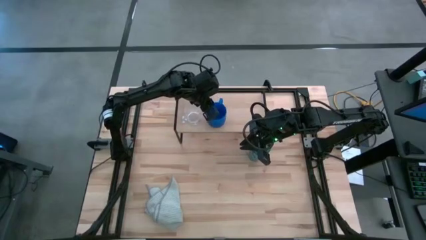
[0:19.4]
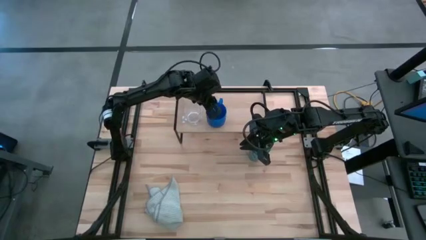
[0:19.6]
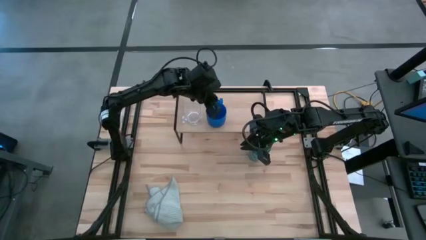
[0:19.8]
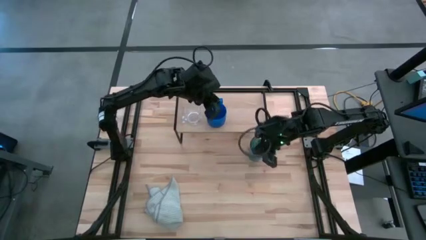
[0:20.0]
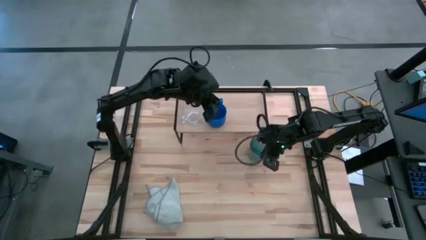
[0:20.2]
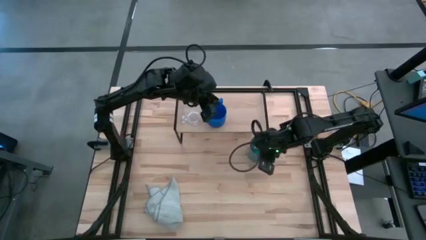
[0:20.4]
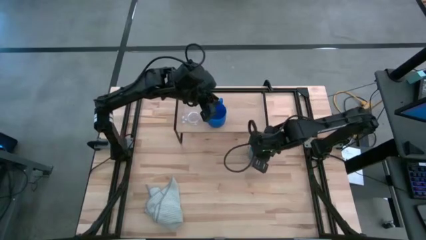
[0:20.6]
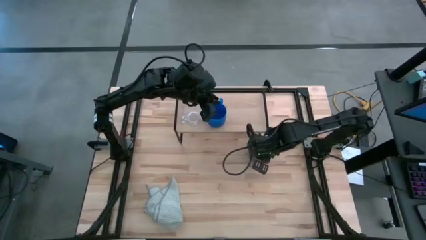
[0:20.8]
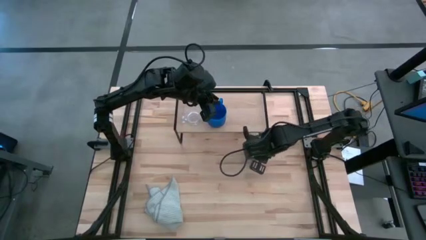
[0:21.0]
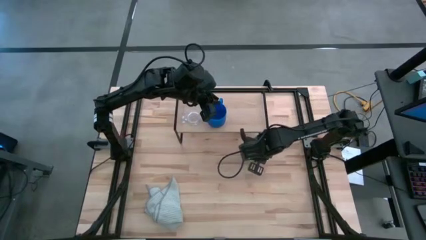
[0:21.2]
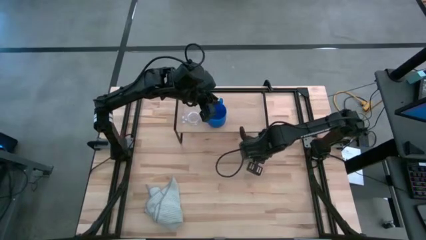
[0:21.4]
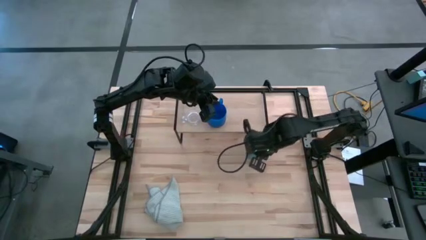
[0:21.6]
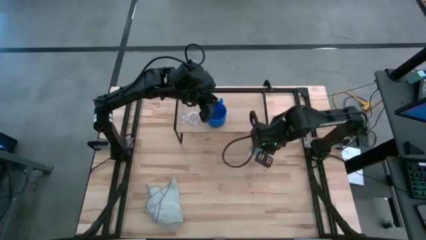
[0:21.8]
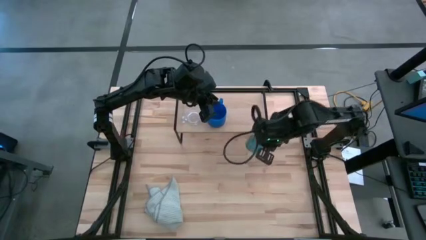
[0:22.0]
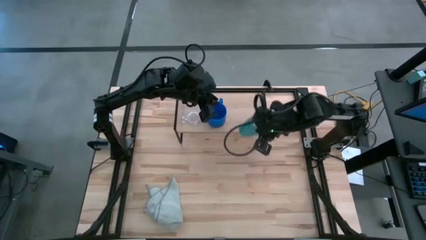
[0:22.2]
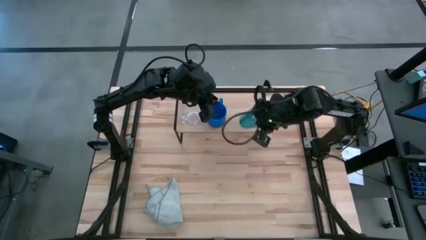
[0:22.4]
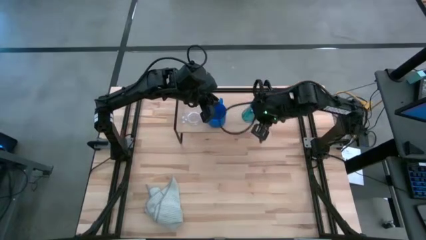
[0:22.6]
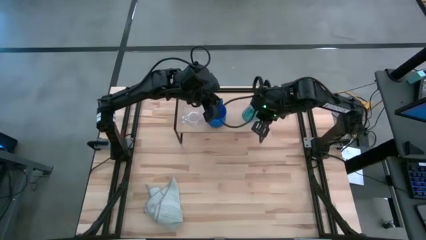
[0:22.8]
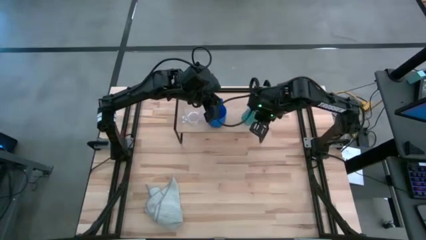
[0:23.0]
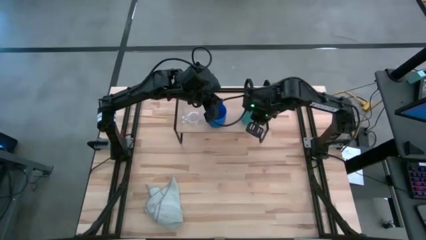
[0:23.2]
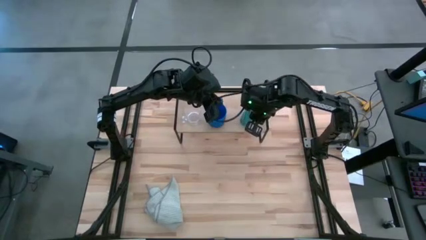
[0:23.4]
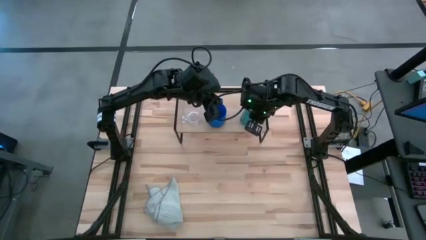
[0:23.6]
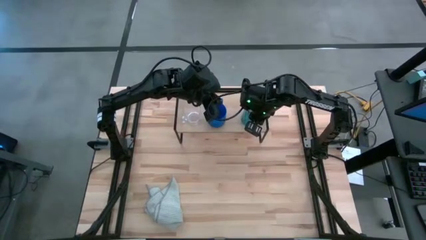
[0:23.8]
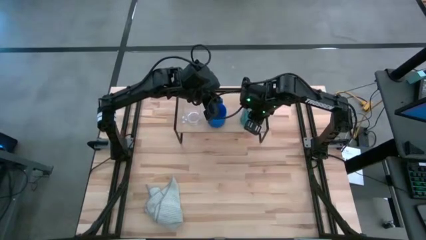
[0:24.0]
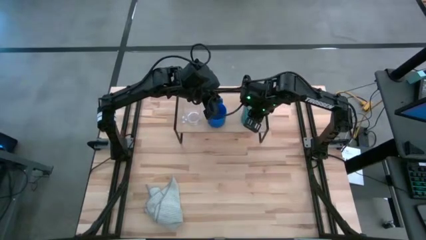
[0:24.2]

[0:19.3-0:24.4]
Task: Stack small to large cups/mugs on shelf
Put the green cup on the shelf

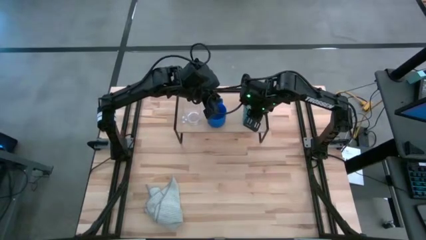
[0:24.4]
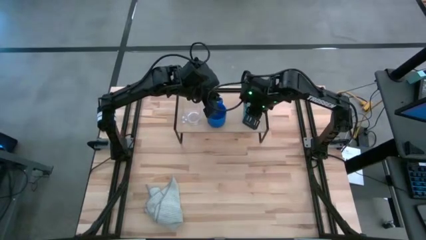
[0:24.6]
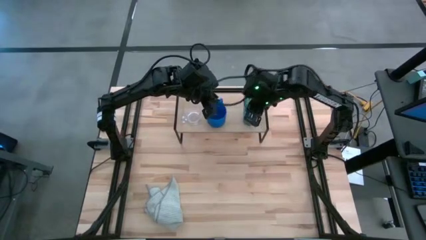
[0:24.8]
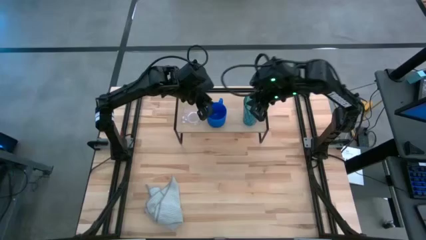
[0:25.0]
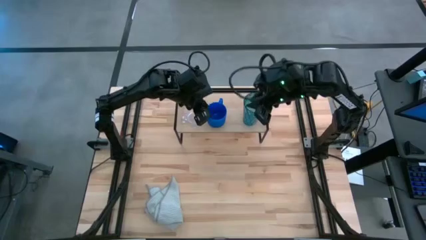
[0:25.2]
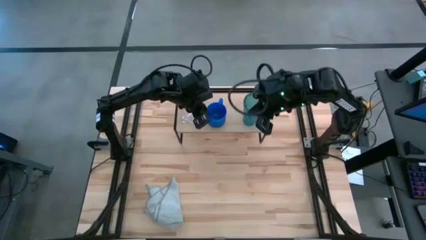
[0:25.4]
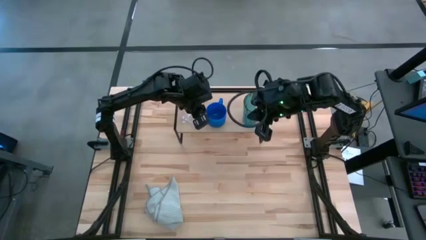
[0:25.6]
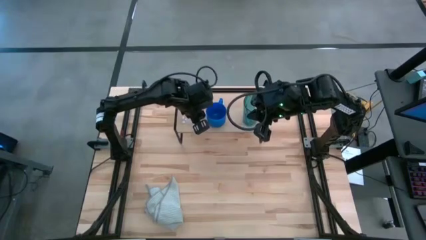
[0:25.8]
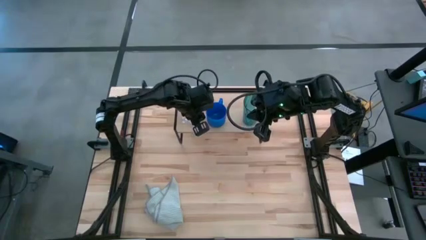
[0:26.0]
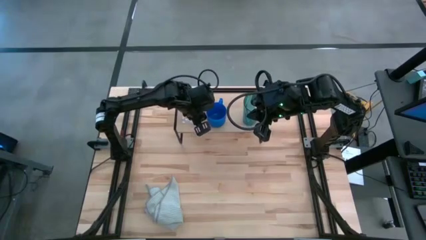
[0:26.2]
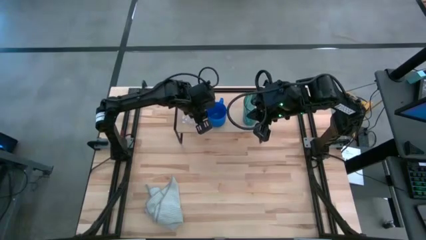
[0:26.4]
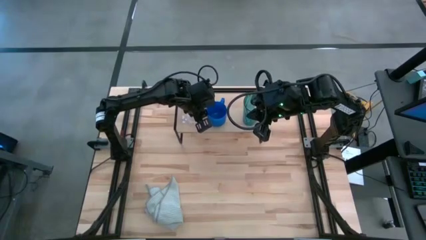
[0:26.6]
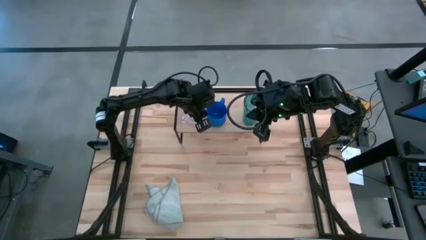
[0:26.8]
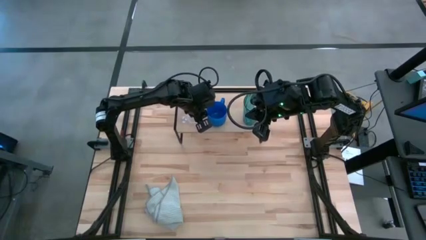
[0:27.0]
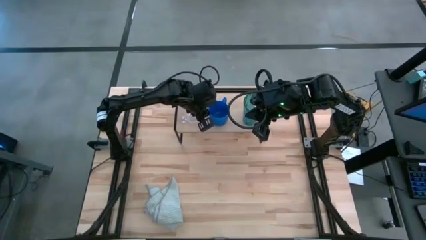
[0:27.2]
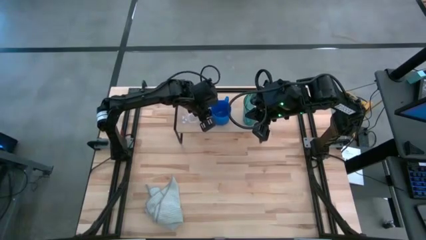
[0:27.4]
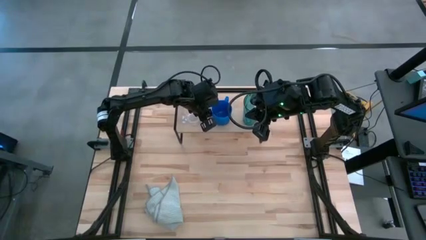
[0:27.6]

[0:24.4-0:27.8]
Adjust the blue mug on the shelf

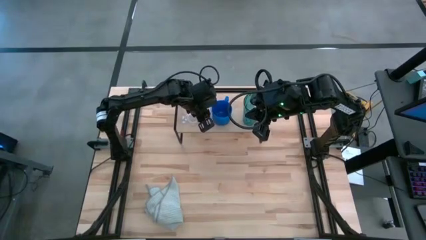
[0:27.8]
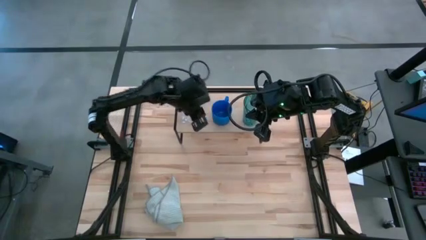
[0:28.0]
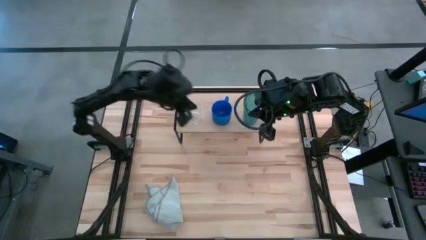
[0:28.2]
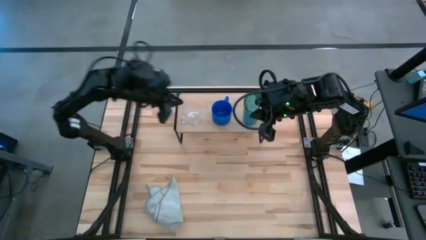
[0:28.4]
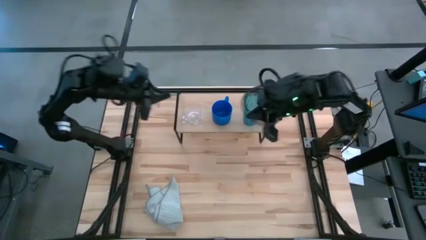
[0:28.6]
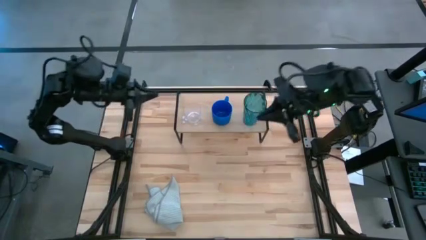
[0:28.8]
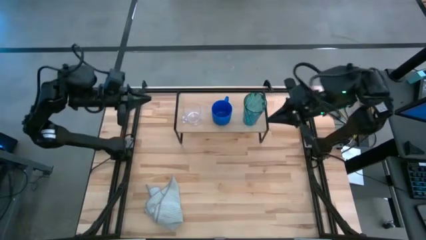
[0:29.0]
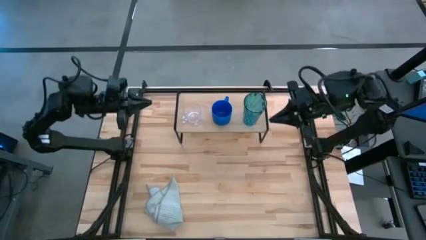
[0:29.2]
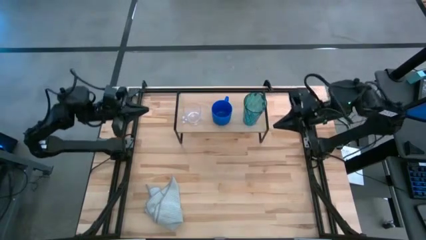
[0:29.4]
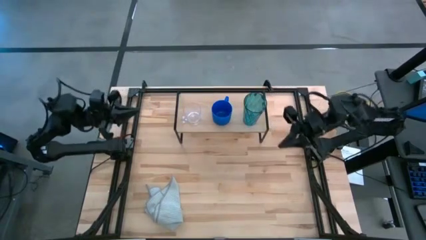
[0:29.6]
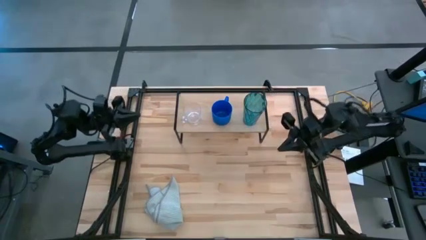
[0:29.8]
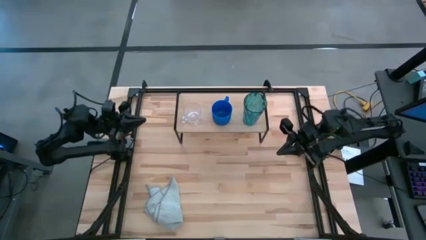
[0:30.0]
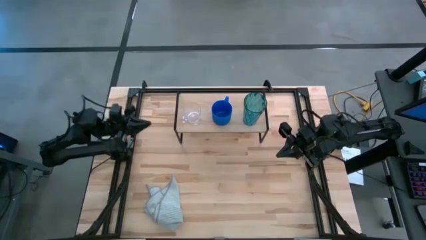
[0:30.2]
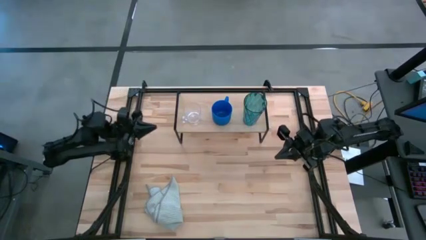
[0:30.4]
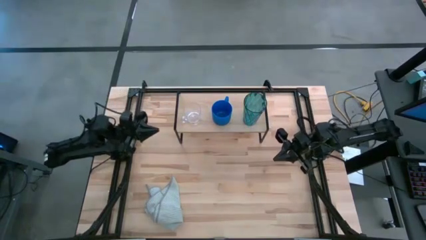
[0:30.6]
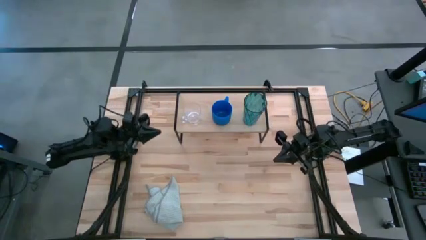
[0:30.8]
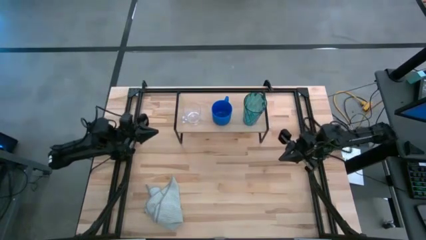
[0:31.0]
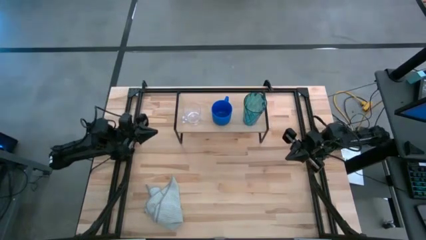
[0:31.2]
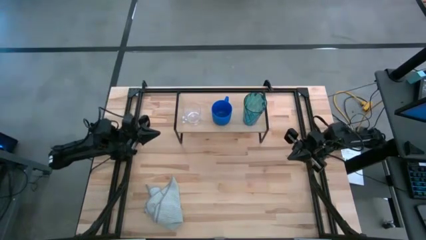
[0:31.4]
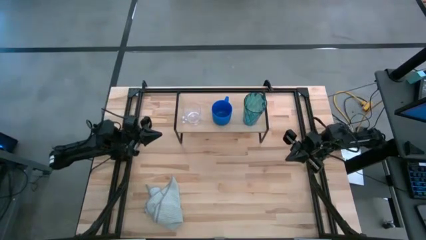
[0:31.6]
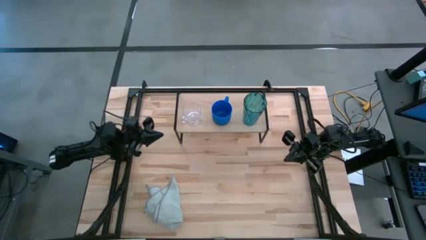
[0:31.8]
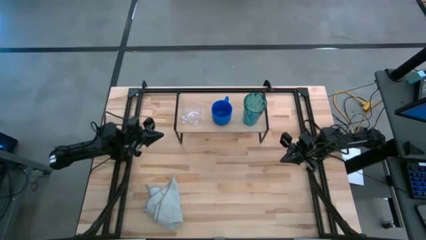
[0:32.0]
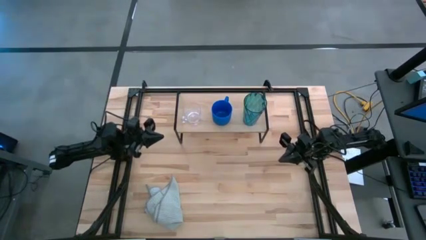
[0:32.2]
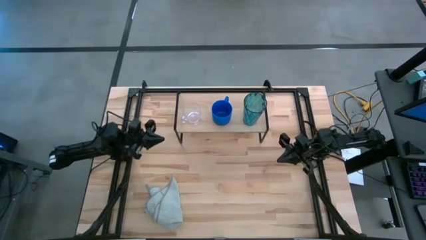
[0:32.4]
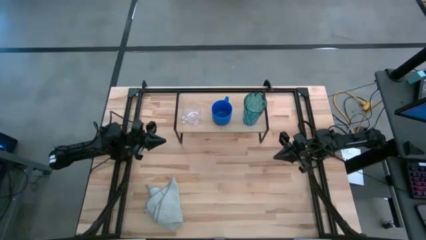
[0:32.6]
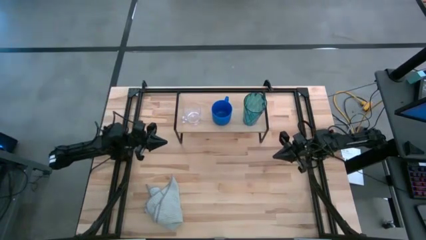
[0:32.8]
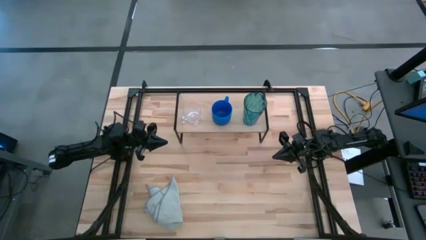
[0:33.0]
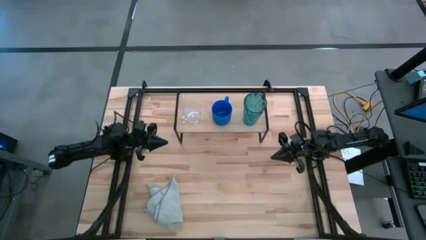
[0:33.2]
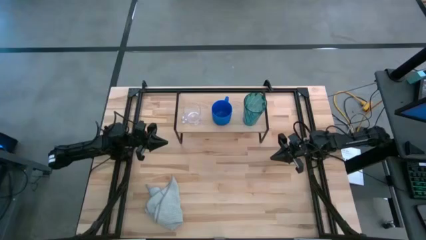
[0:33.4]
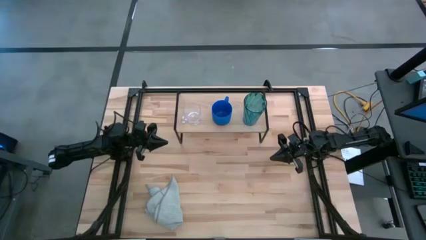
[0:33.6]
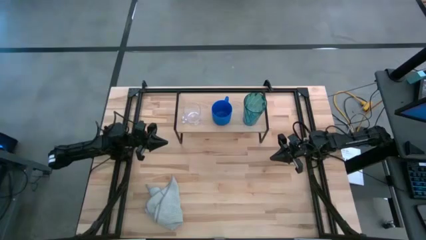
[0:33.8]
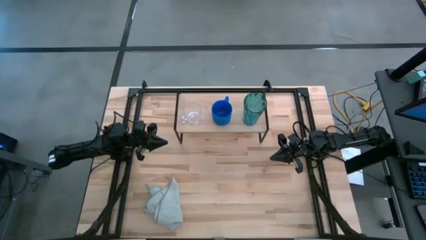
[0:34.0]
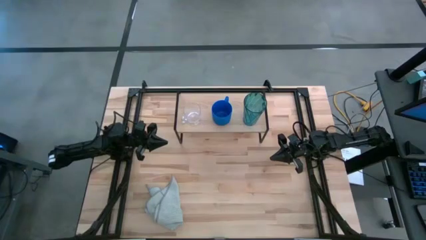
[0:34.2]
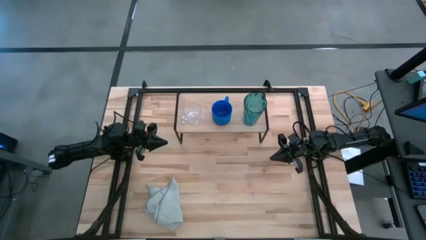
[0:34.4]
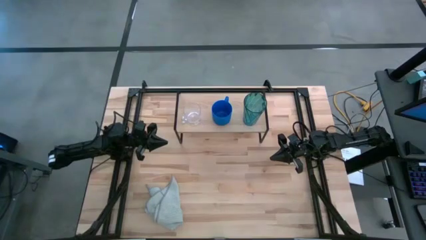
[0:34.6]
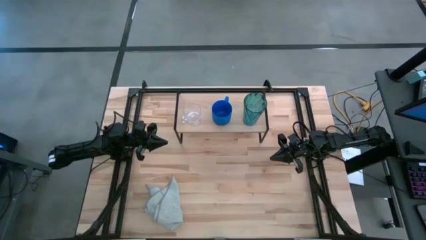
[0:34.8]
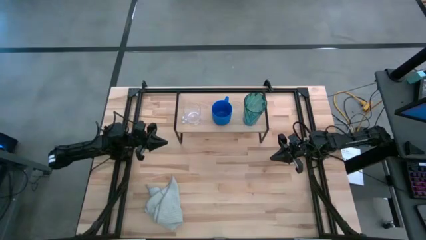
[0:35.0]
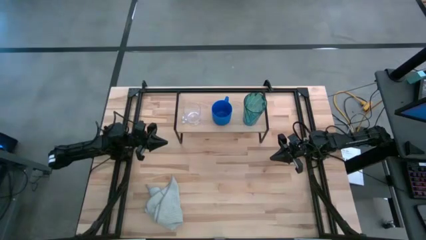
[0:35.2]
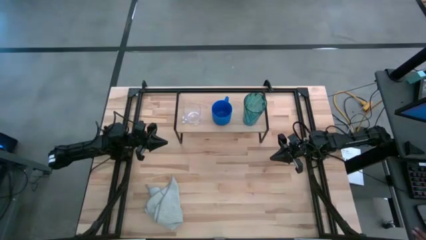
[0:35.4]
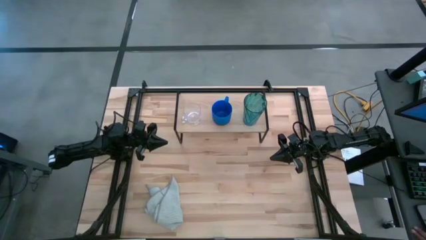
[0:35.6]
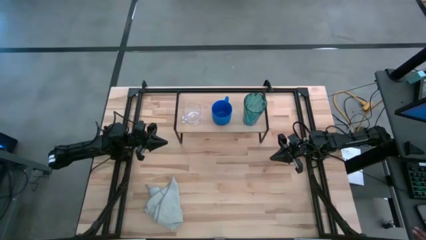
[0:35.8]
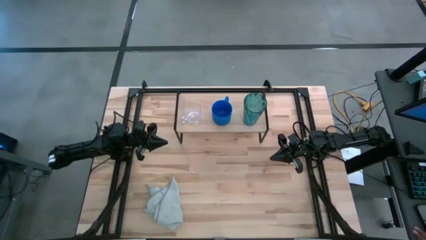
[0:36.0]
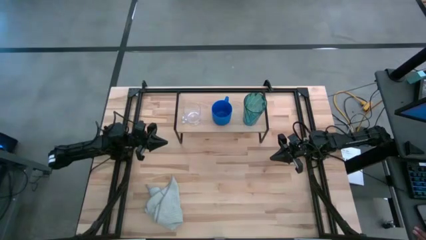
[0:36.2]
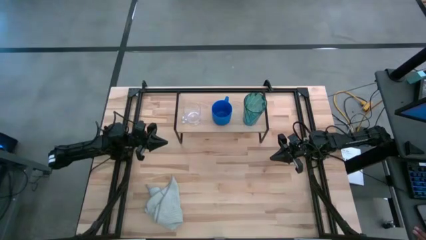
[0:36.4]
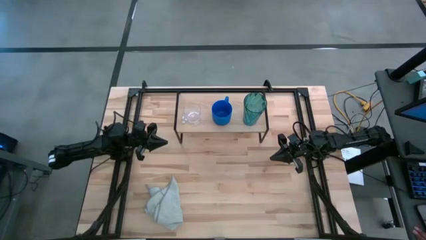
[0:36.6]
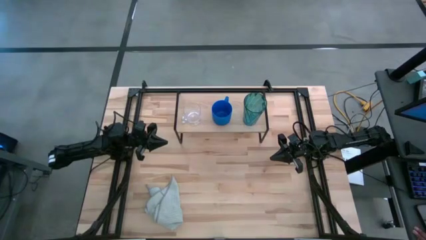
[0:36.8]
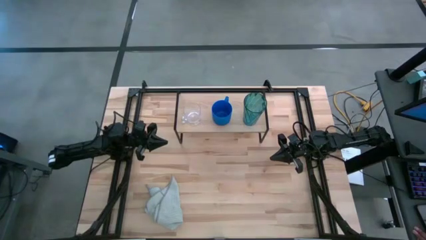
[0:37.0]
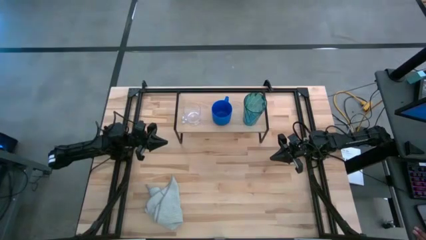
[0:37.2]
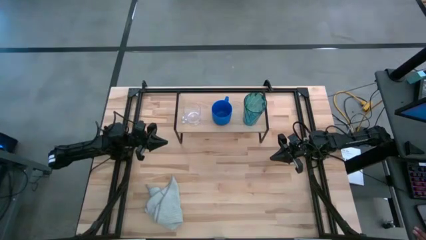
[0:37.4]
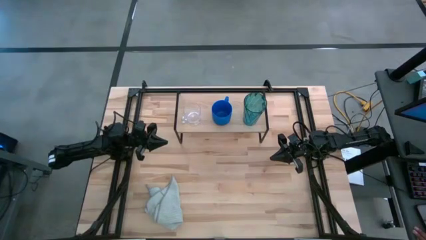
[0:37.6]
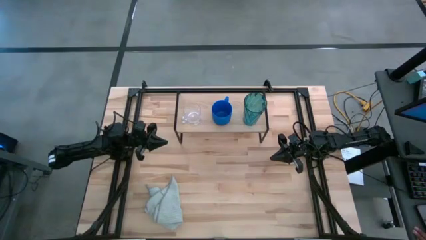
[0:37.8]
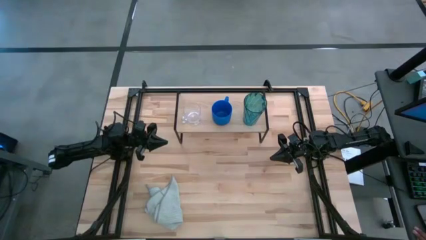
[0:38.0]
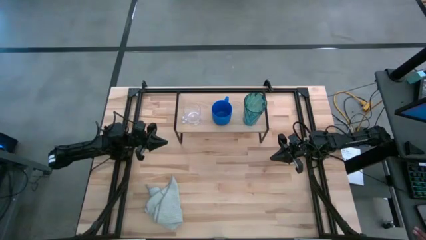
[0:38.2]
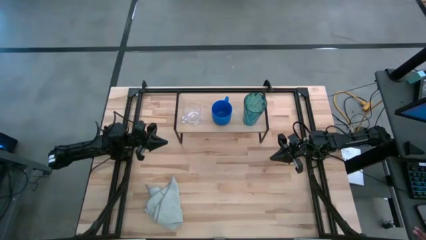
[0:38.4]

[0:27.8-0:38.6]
Return to Home Position
